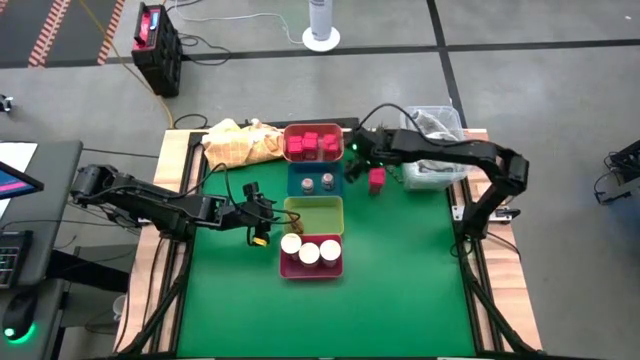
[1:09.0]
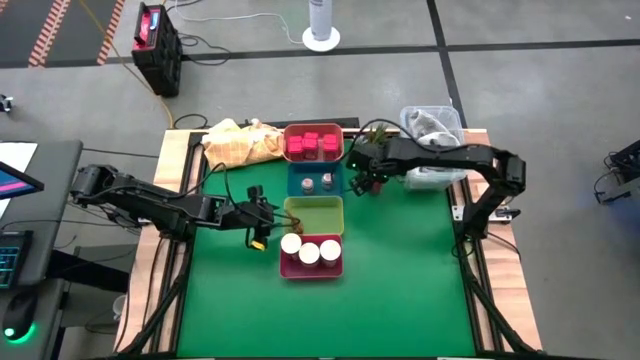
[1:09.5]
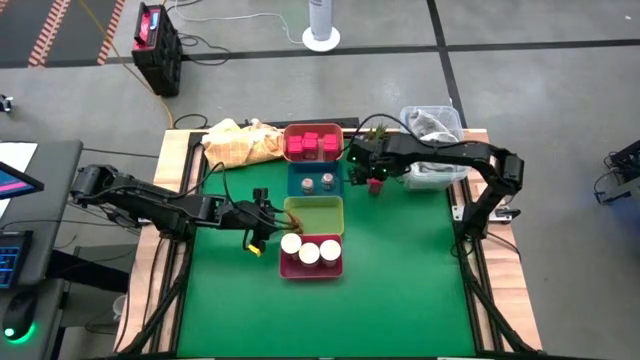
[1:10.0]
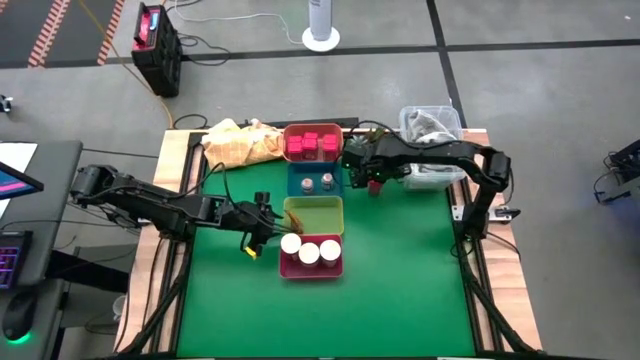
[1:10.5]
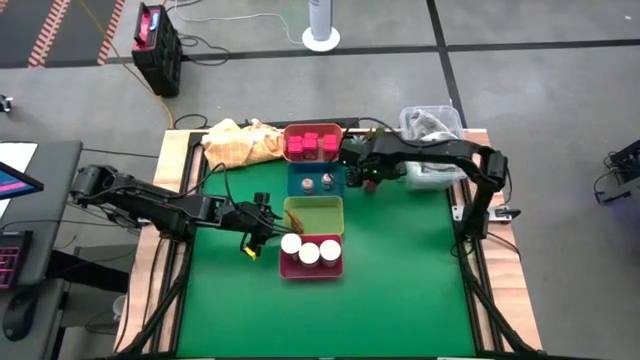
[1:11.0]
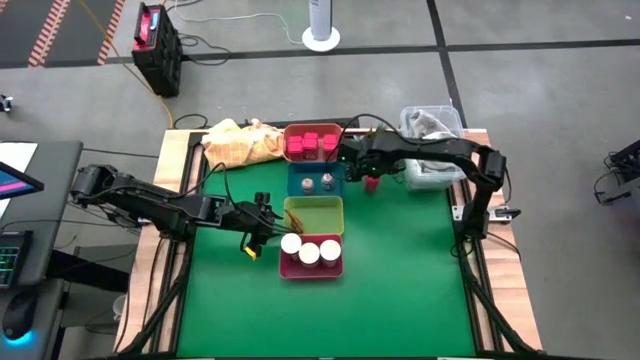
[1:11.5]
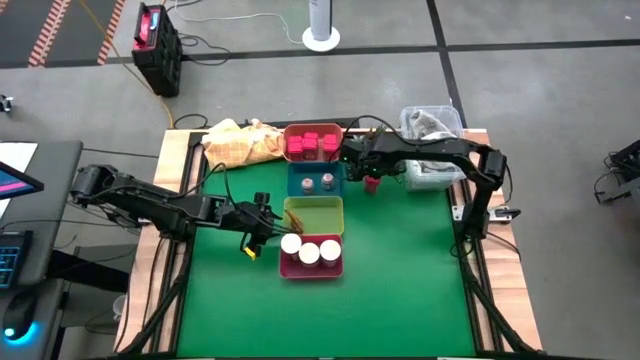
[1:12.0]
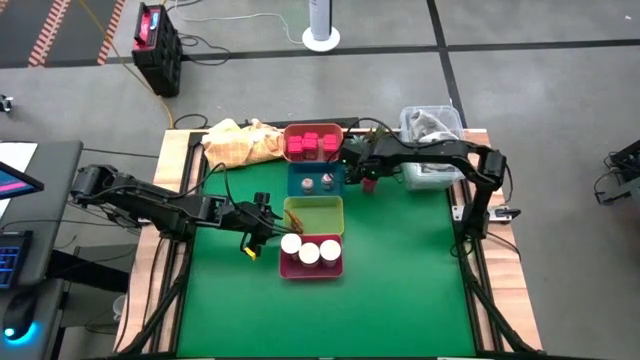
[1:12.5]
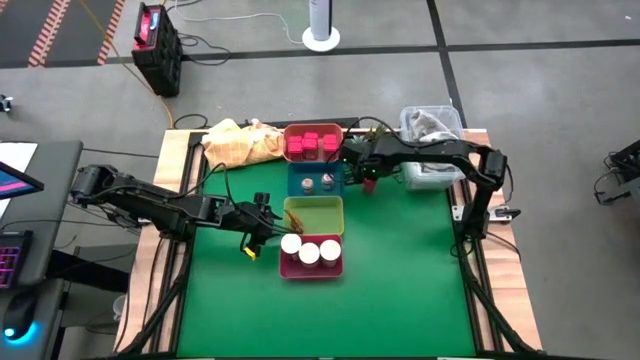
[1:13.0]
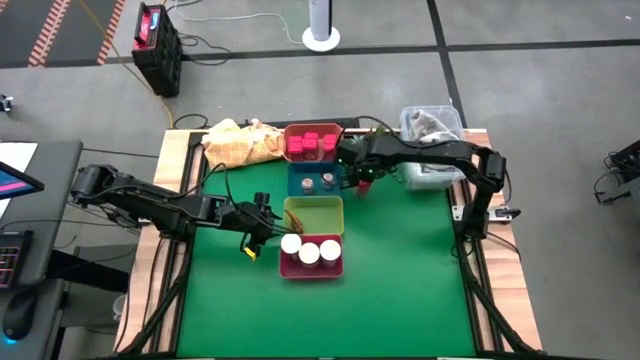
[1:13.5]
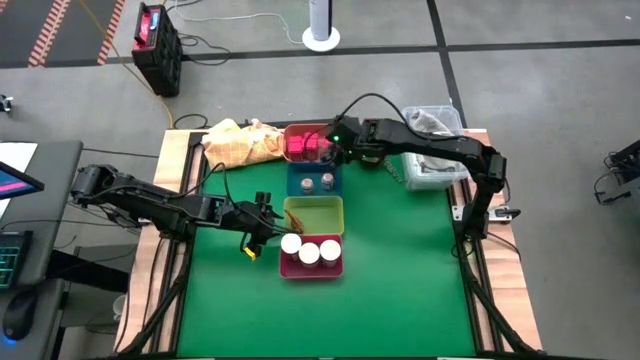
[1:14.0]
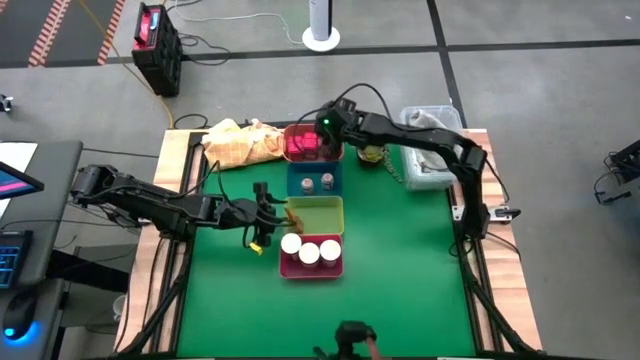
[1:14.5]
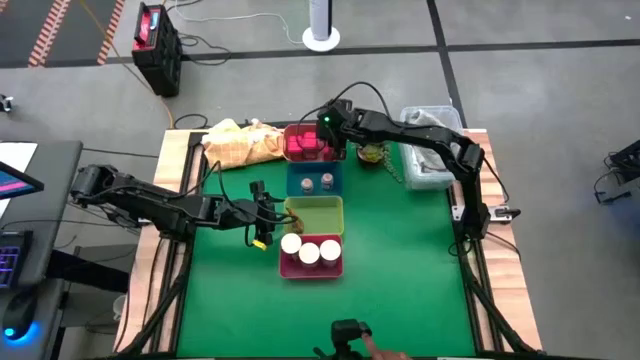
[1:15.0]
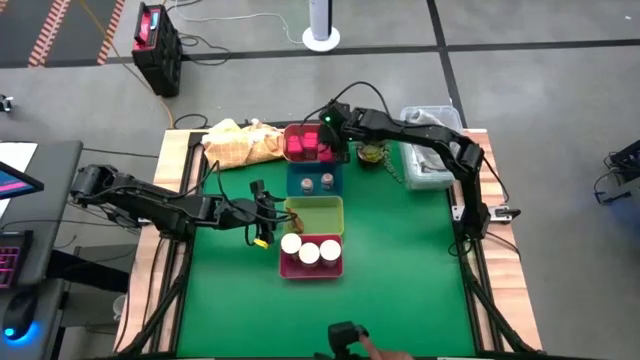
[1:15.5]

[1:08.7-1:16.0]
Task: Sort spices by type
Put the red seasoning can into the orange bin

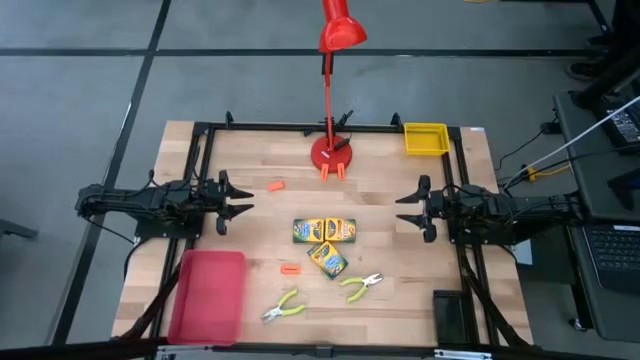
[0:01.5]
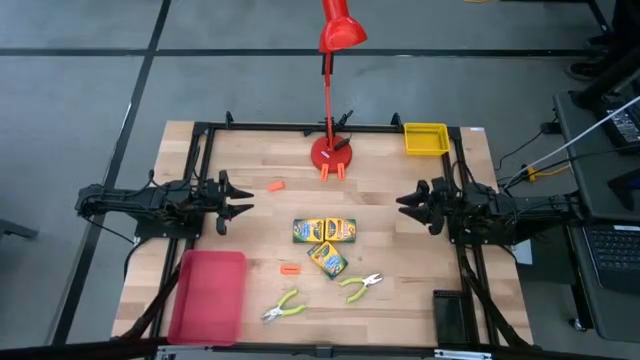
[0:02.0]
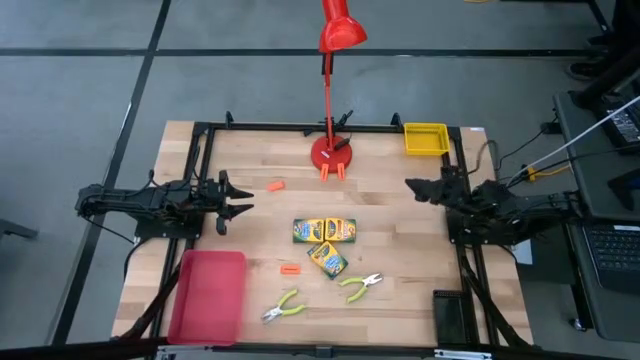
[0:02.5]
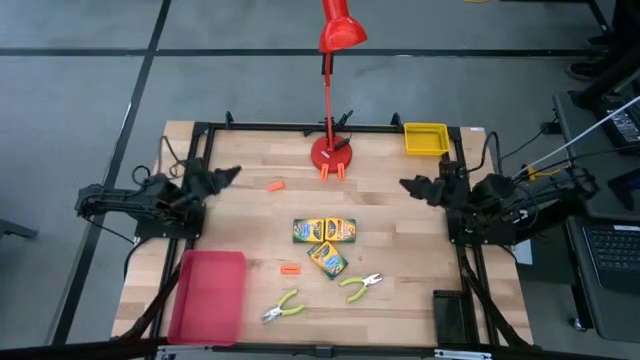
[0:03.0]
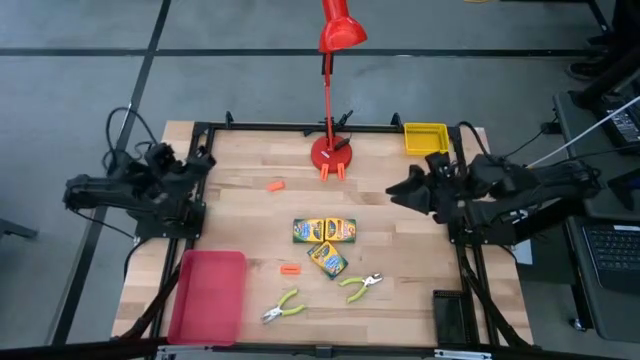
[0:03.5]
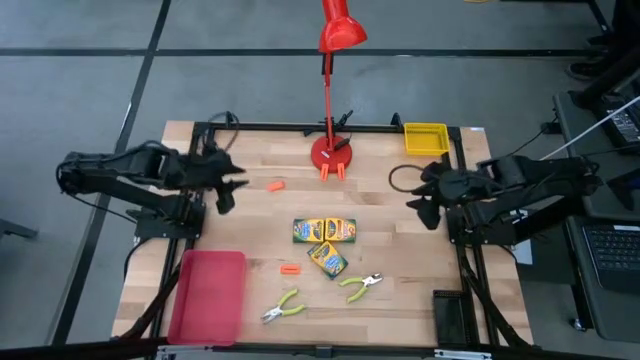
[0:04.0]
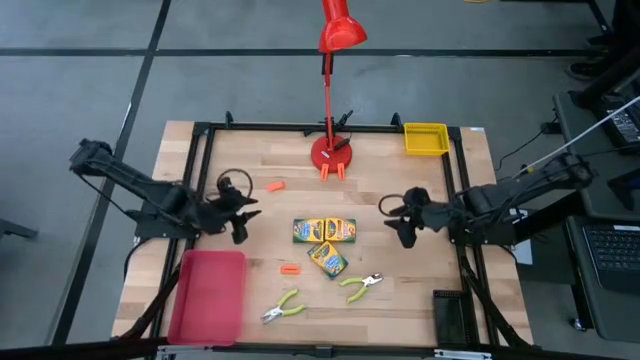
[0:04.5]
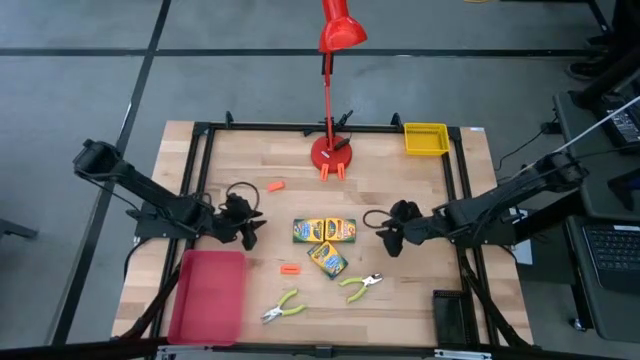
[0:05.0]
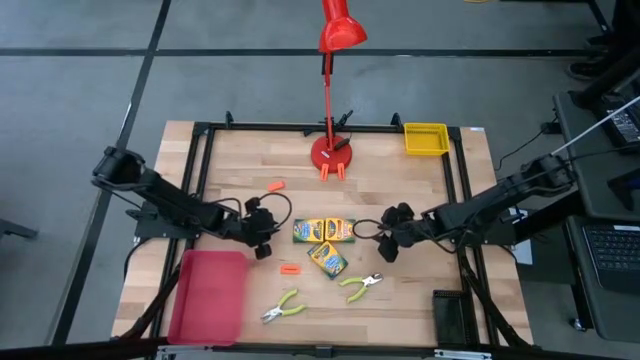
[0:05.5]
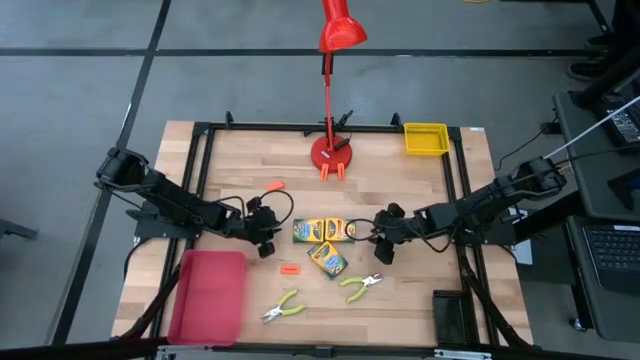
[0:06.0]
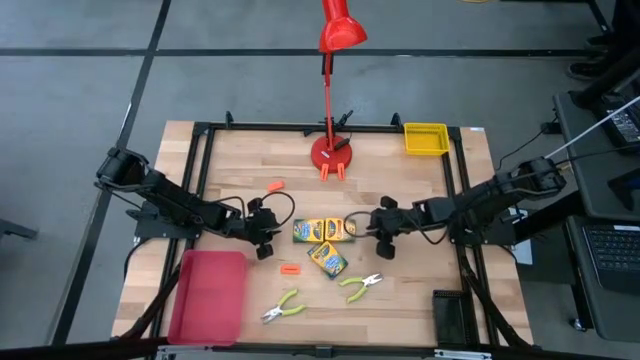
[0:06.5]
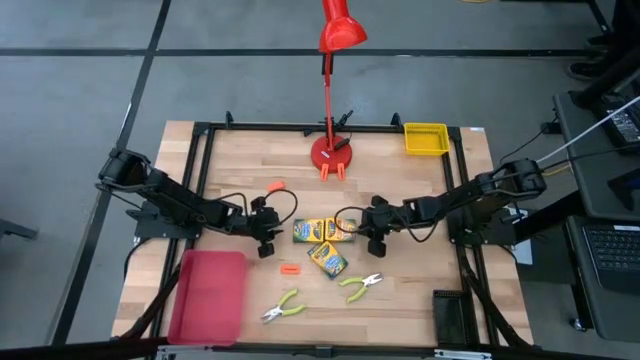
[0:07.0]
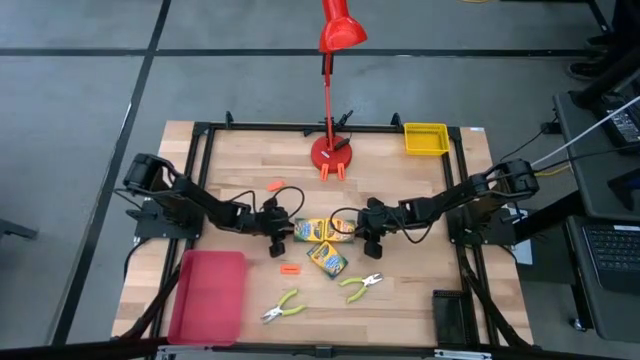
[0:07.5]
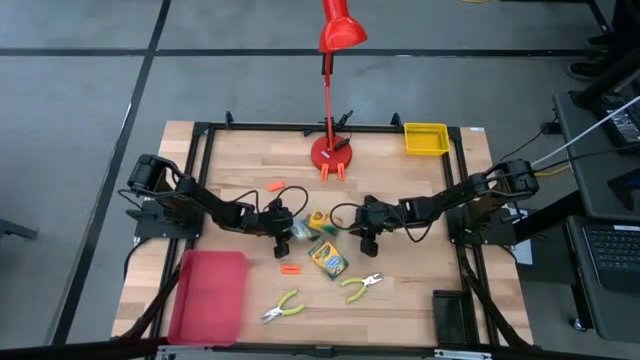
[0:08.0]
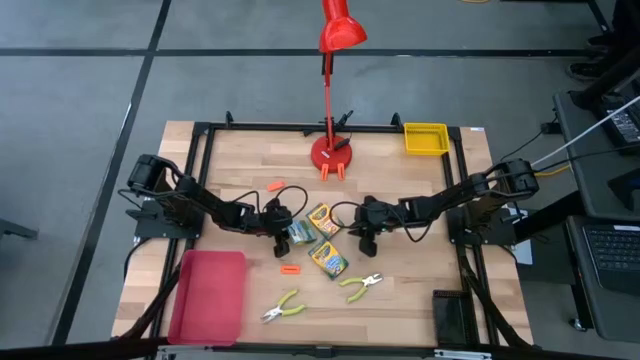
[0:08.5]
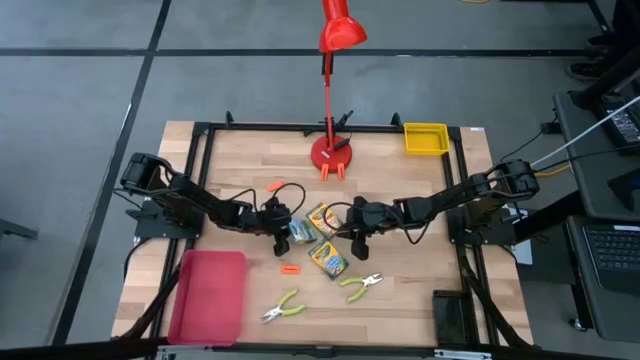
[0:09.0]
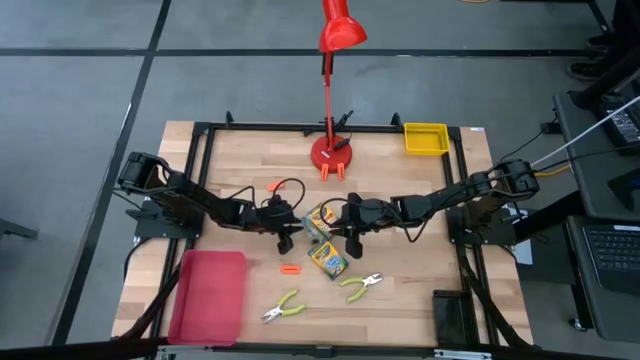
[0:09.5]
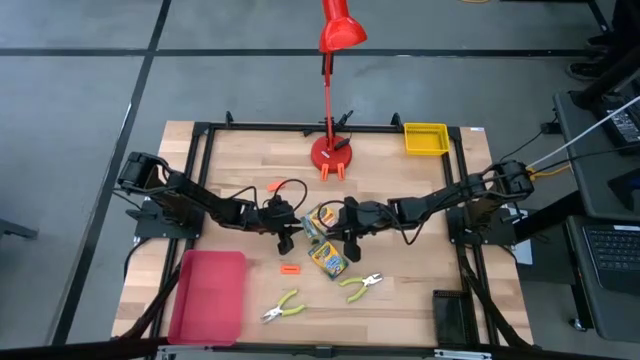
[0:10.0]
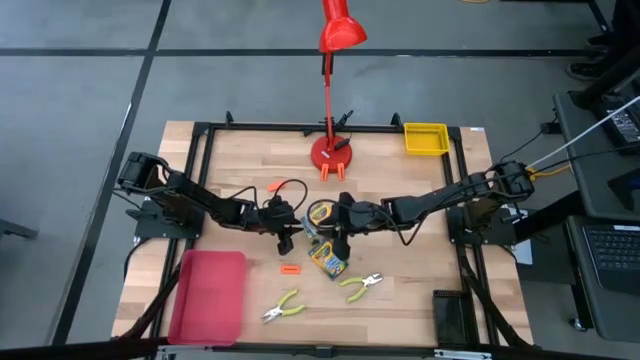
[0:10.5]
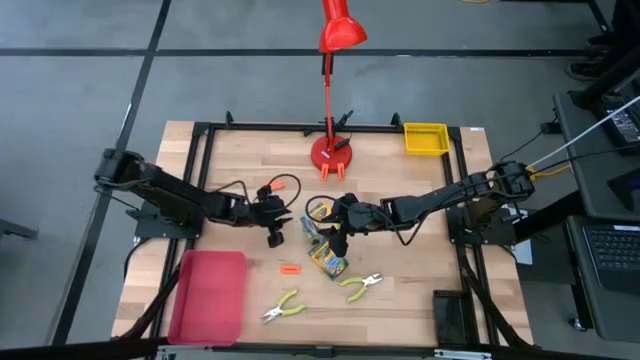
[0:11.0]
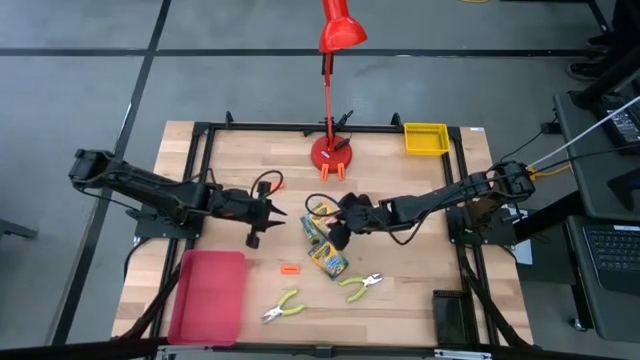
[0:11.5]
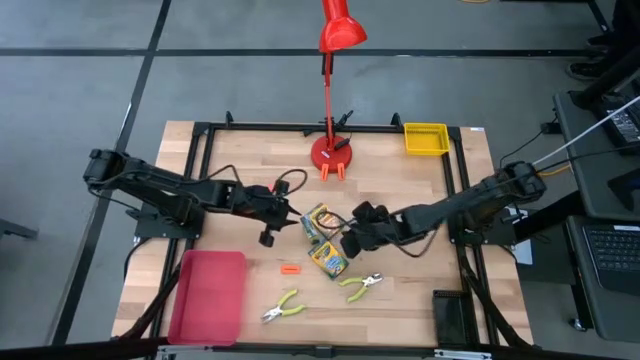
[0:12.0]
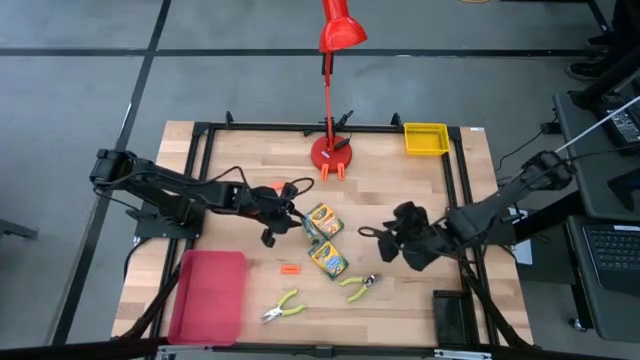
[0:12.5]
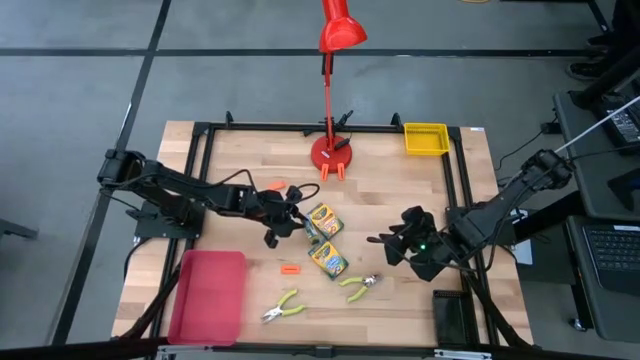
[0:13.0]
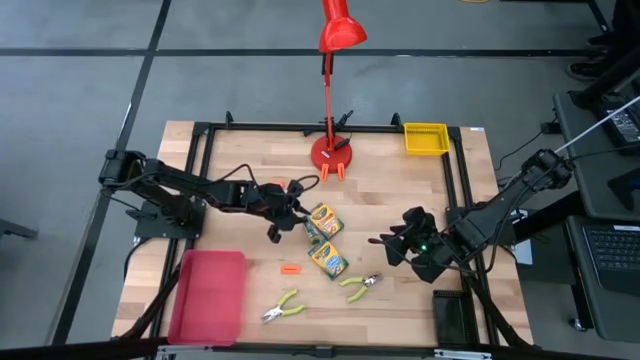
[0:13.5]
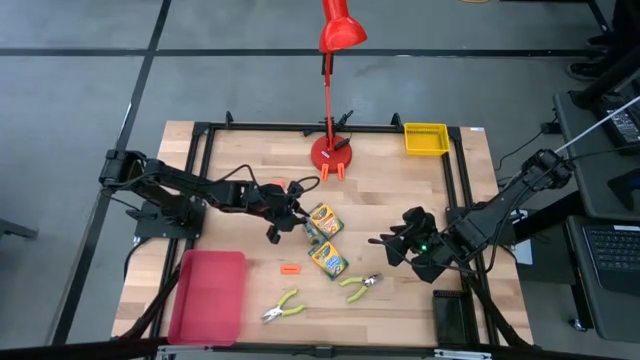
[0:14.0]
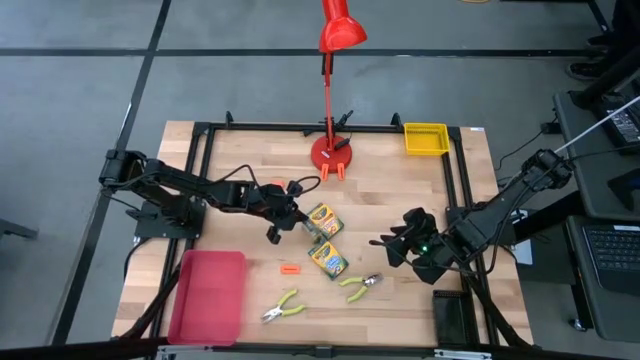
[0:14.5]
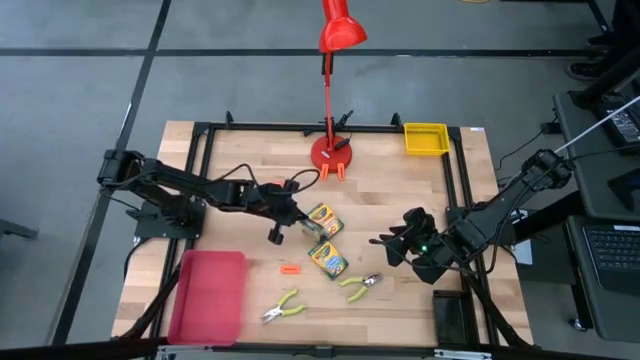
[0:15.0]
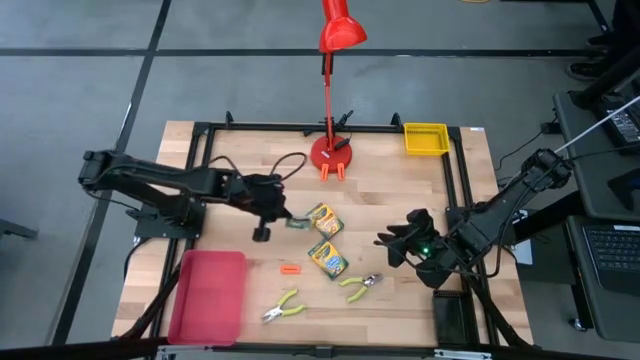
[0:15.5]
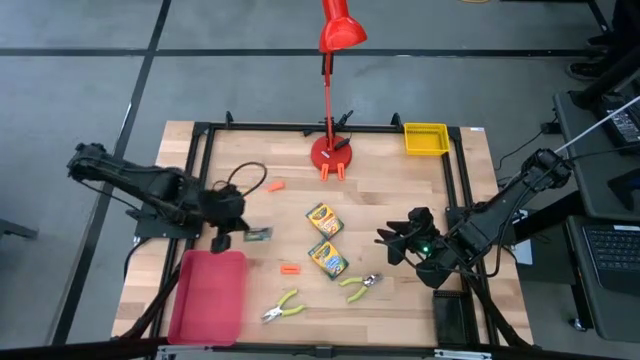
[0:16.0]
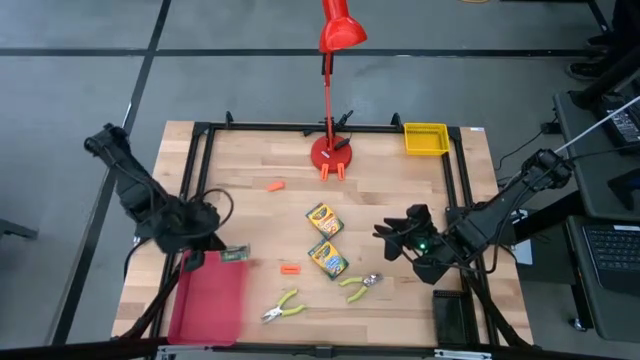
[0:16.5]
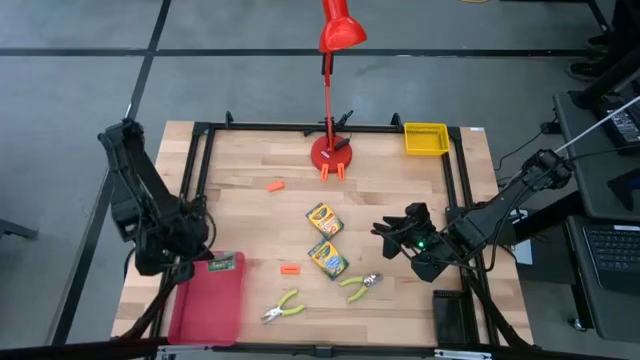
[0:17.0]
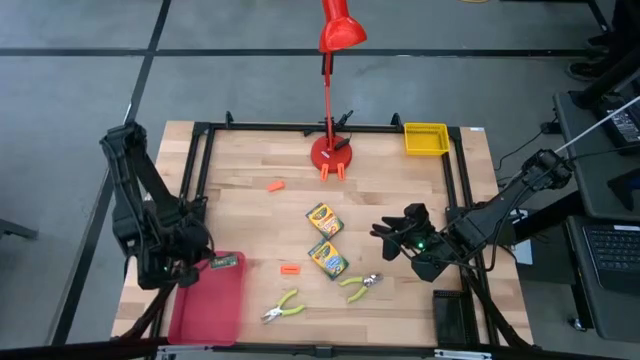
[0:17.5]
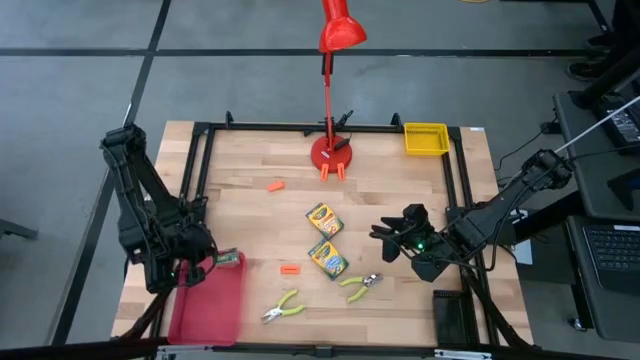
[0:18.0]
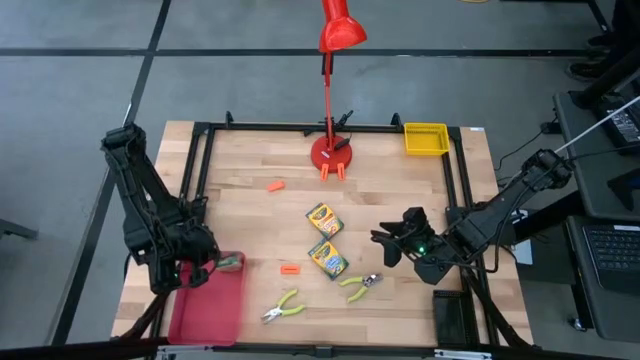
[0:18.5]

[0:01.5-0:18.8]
Task: Pick & Place School Supplies
Put the yellow crayon box into the red bin
